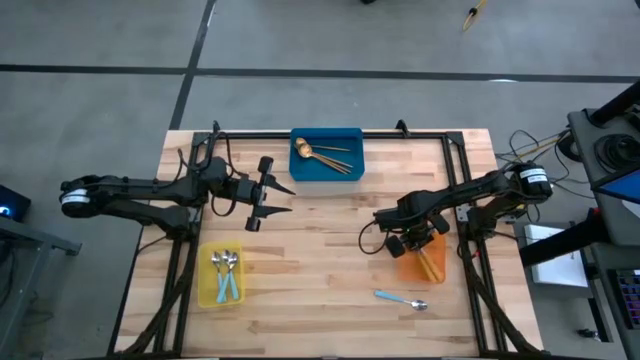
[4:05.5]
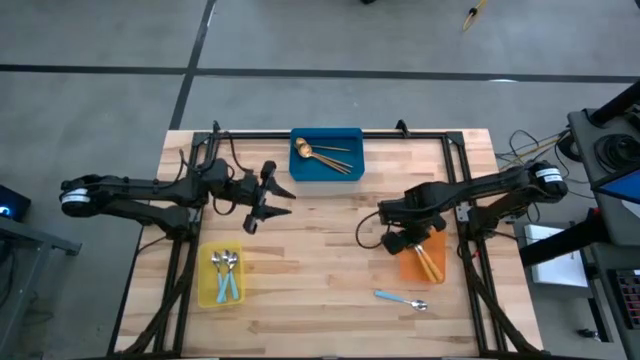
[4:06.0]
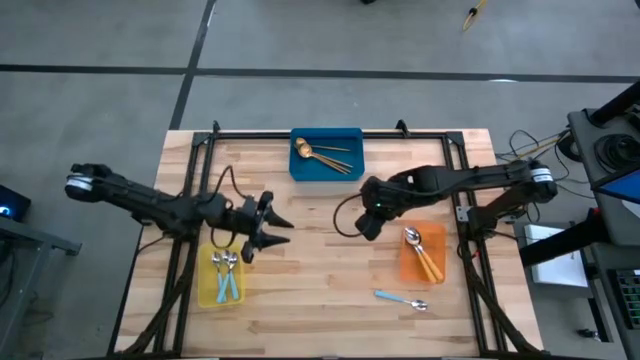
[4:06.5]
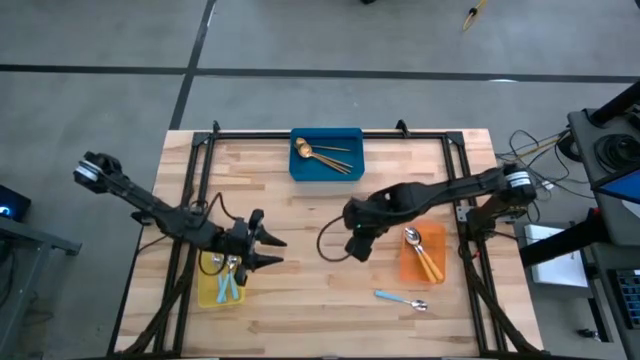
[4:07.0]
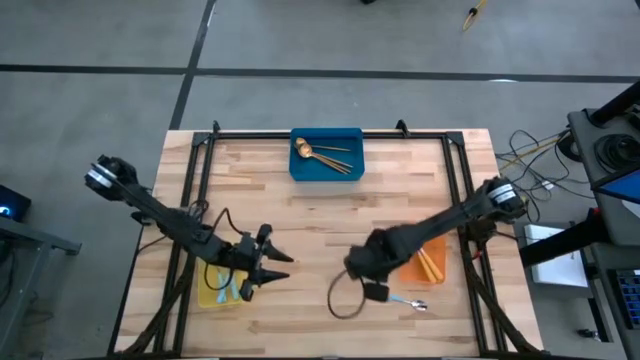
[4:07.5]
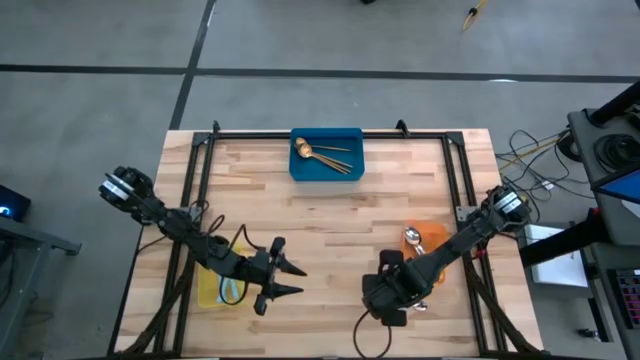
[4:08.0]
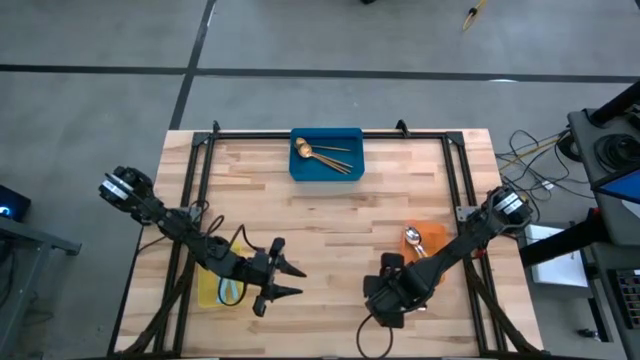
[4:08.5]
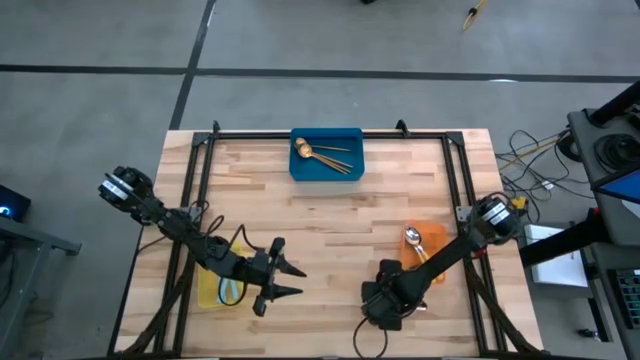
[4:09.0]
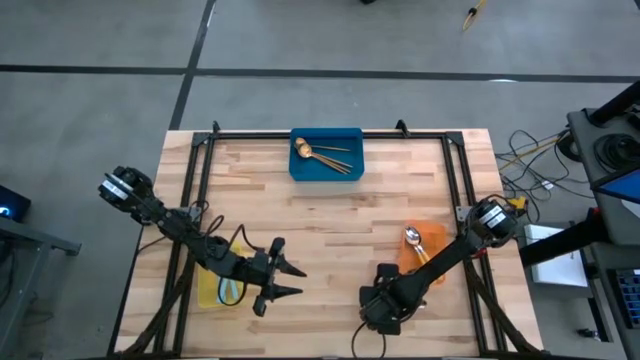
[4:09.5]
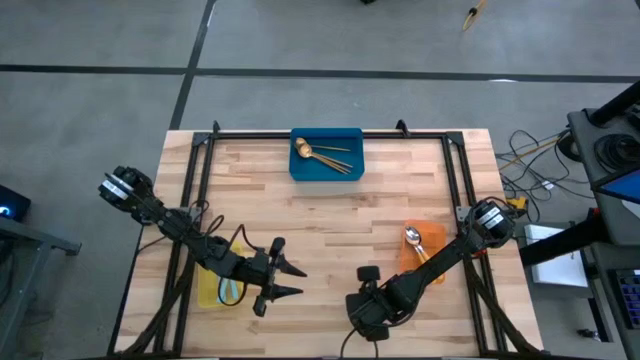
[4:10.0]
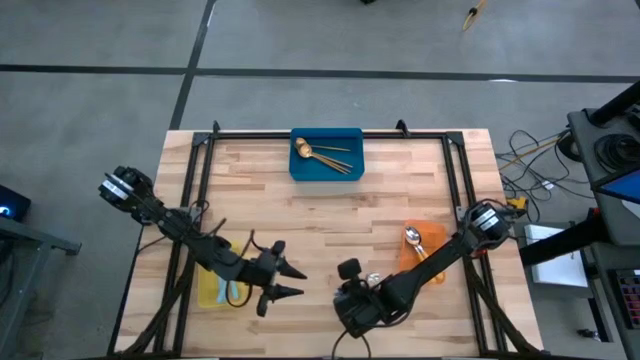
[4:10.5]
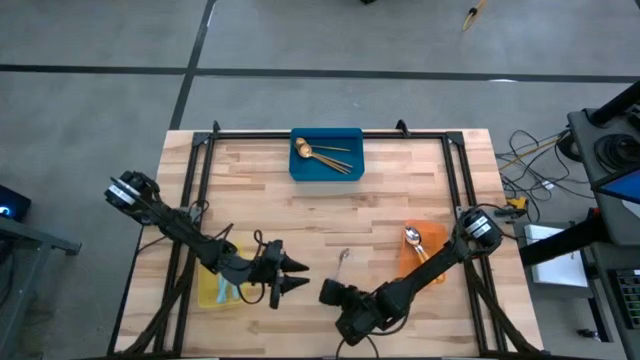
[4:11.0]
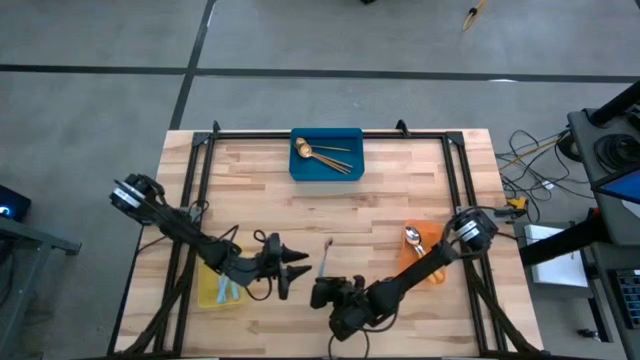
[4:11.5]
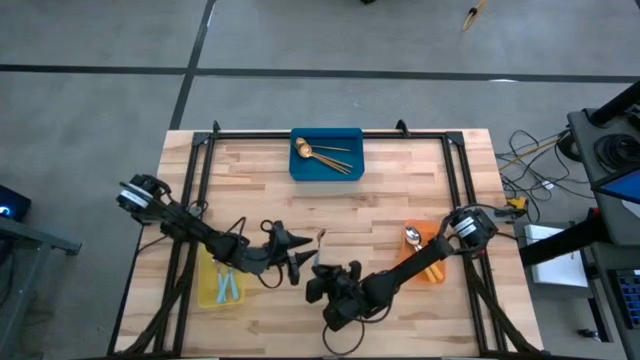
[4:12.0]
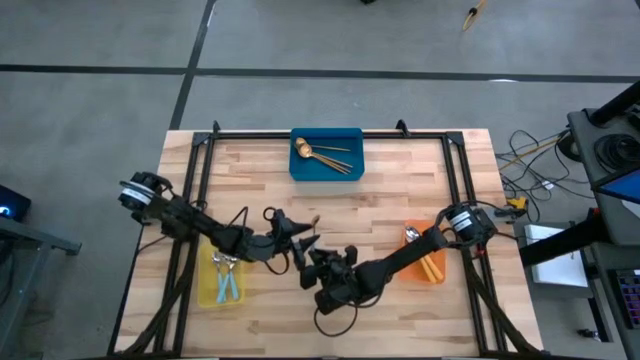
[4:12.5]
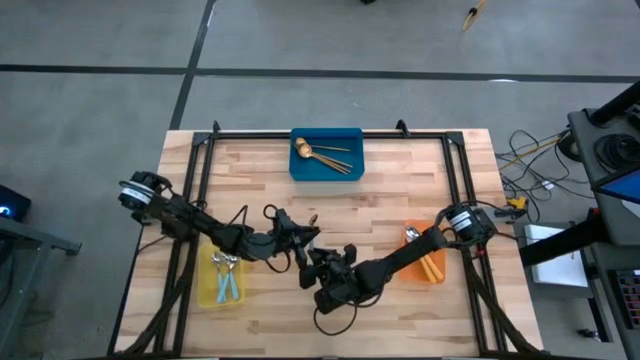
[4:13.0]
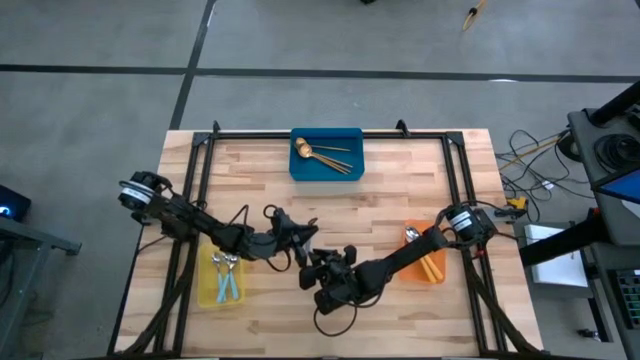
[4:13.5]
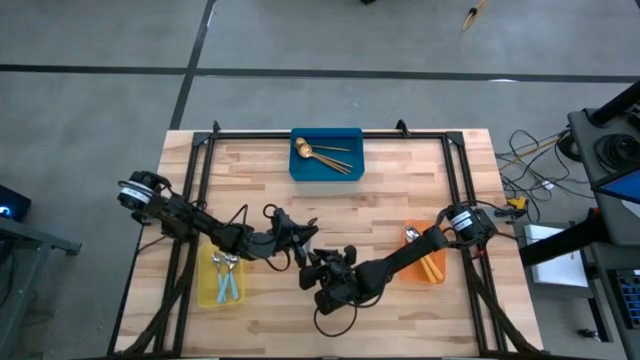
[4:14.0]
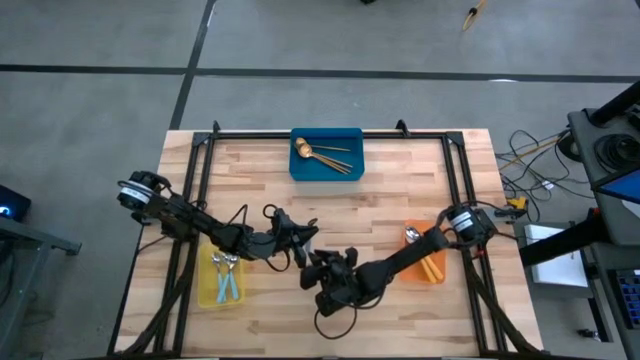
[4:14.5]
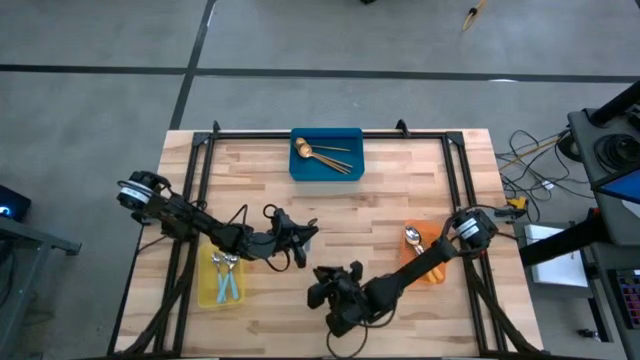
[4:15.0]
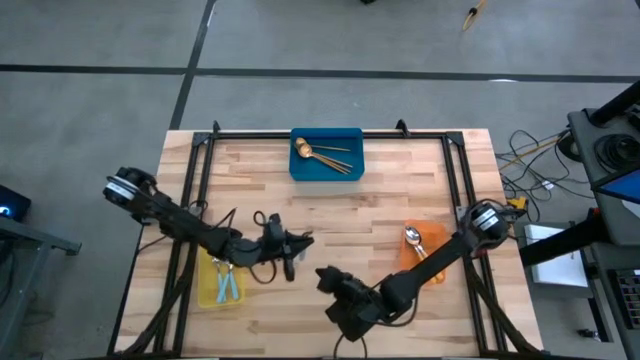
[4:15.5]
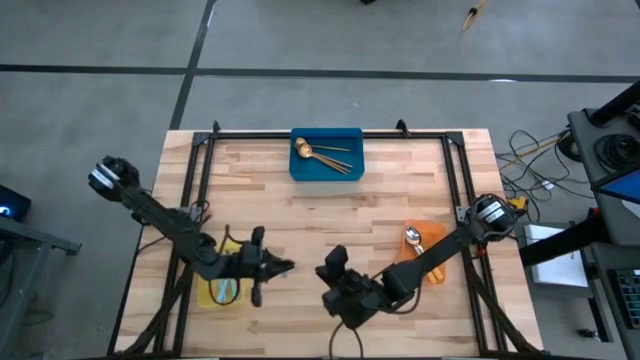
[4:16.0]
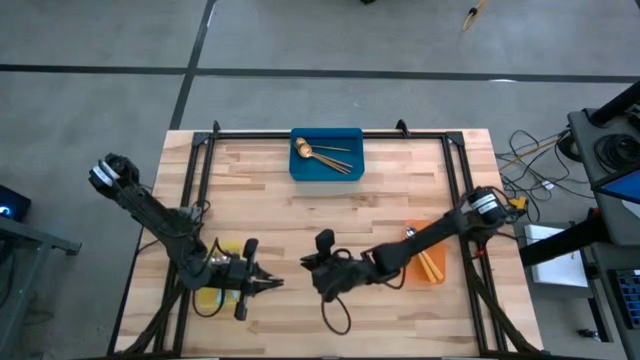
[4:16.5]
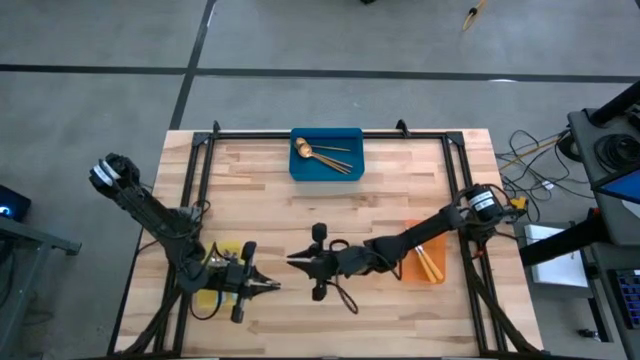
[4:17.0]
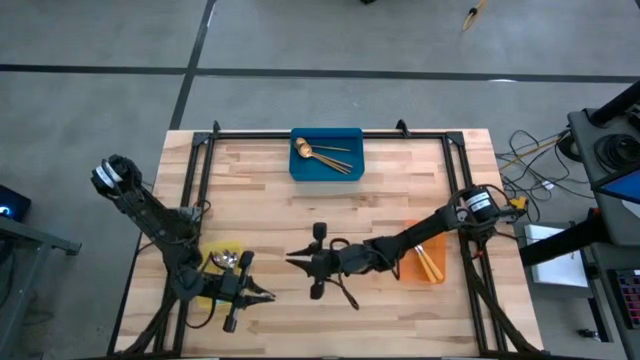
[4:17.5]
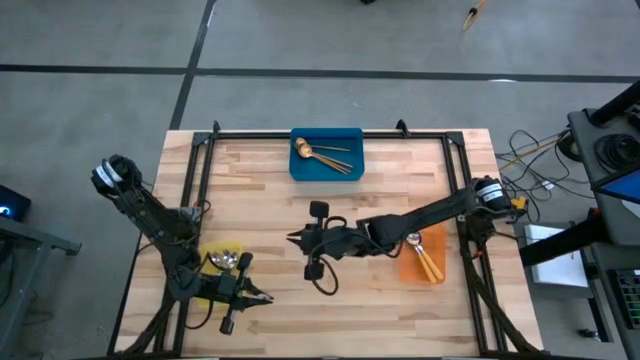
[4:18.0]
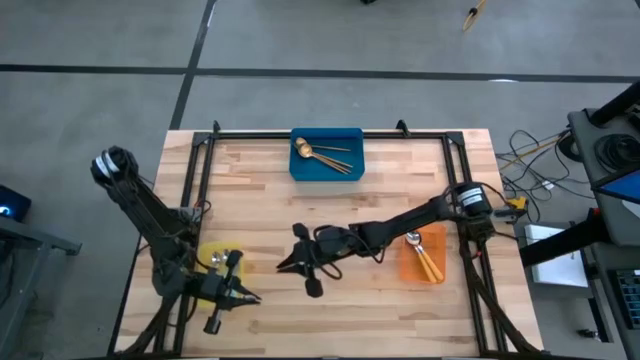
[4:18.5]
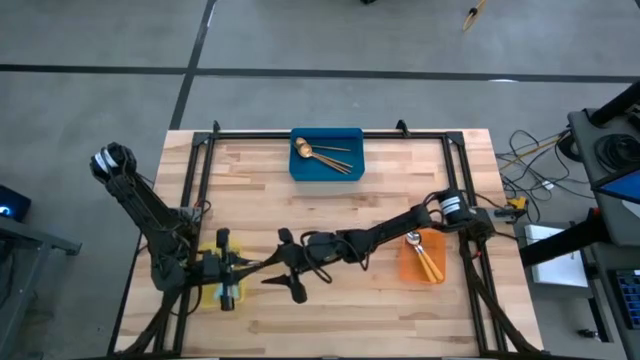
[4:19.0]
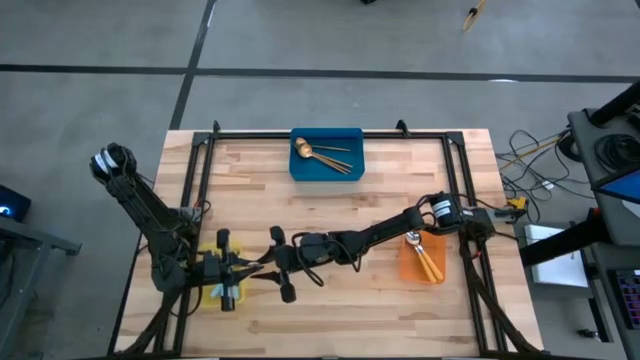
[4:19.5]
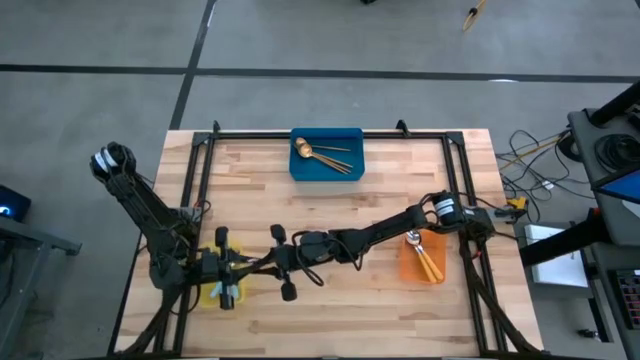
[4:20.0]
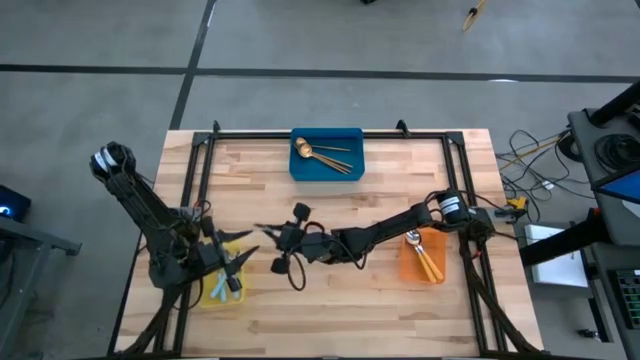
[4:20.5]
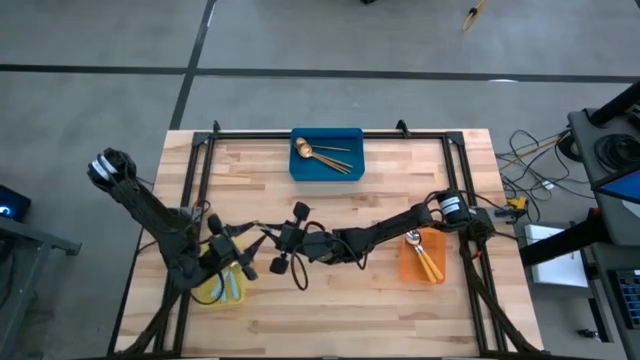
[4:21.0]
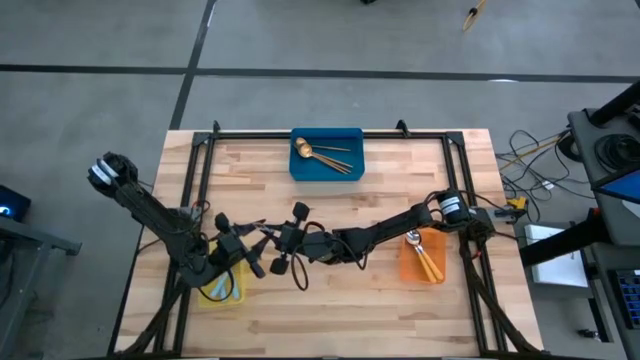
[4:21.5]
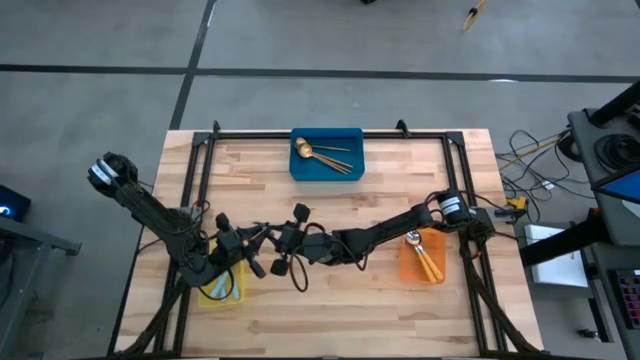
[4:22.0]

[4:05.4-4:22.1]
Task: Sort silverware by color (type)
Put the blue spoon into the yellow bin

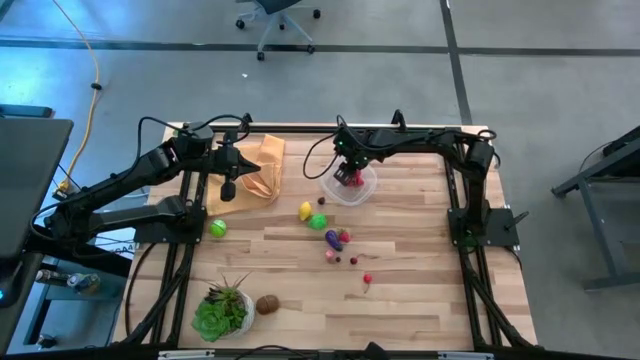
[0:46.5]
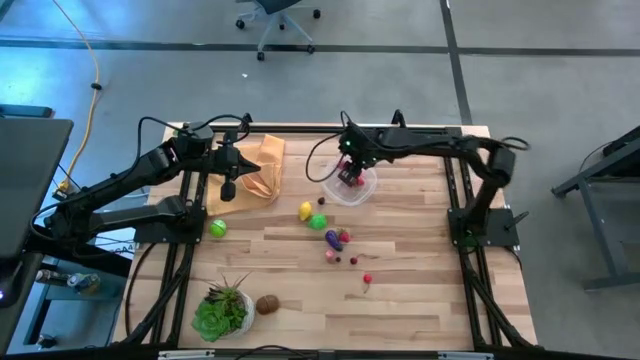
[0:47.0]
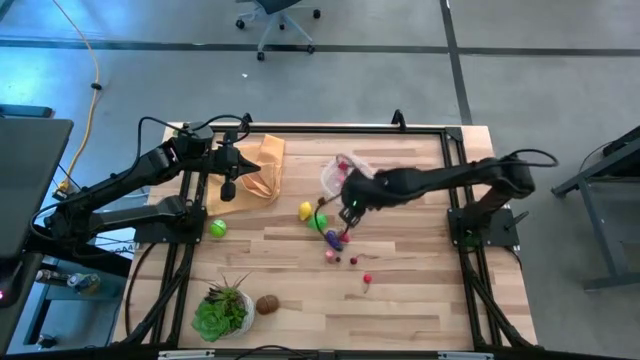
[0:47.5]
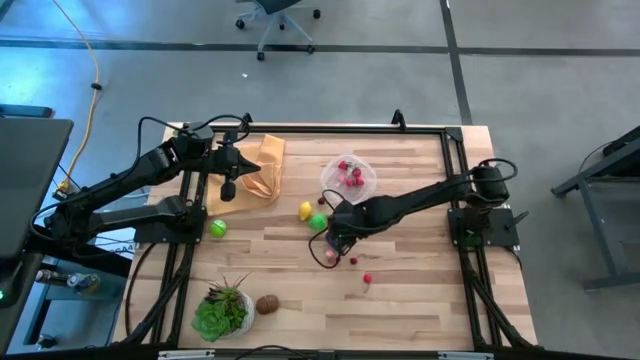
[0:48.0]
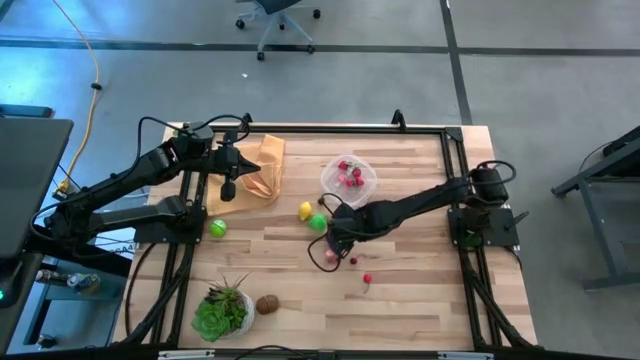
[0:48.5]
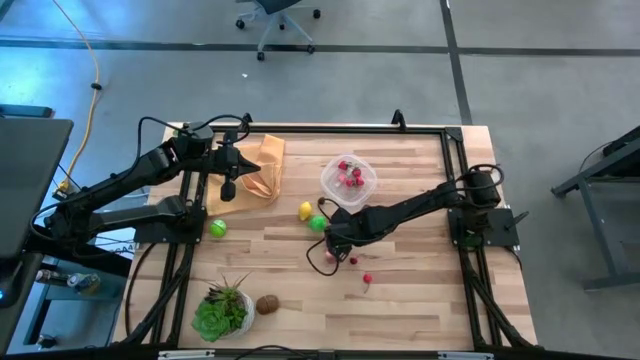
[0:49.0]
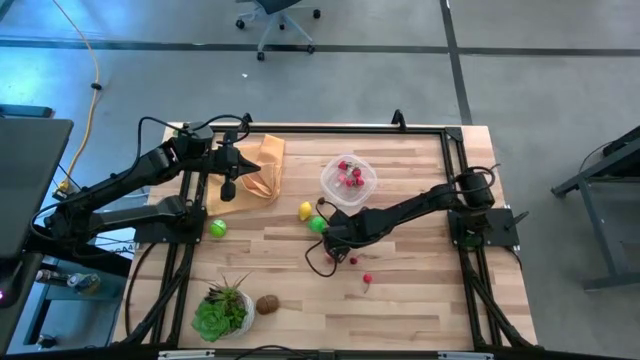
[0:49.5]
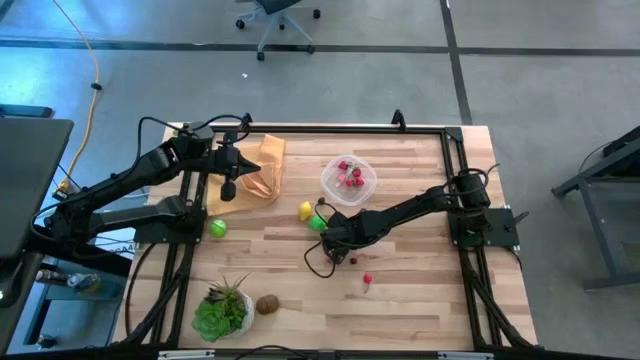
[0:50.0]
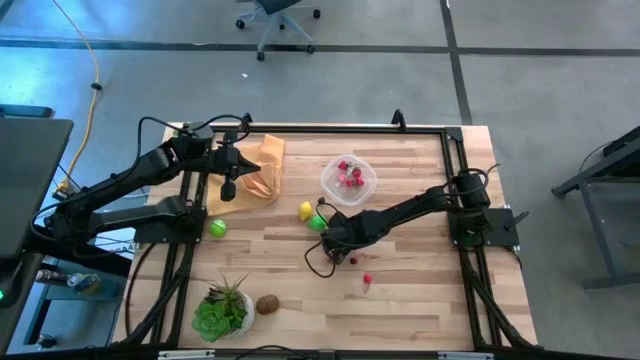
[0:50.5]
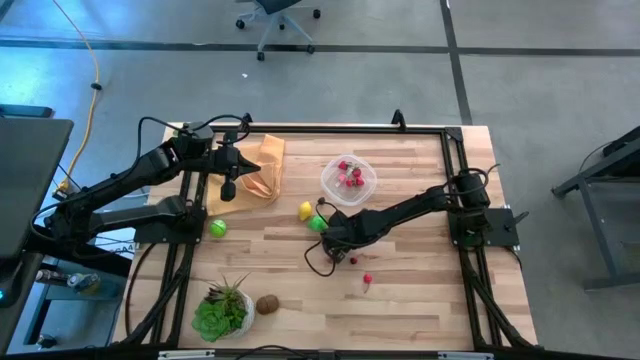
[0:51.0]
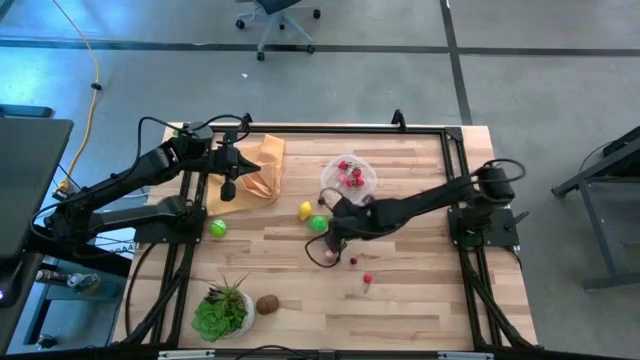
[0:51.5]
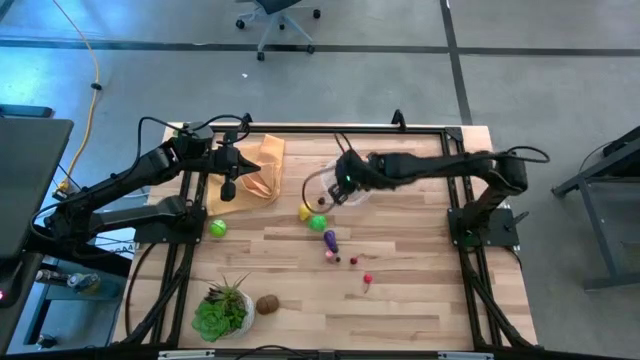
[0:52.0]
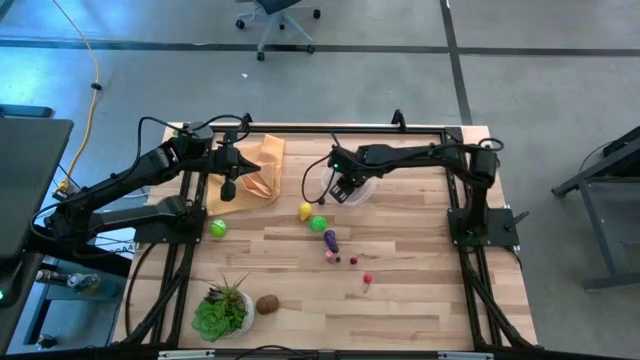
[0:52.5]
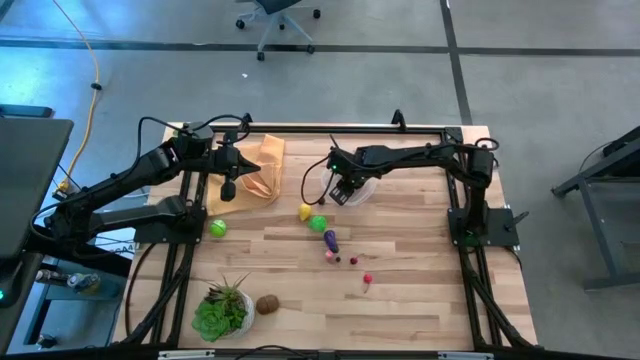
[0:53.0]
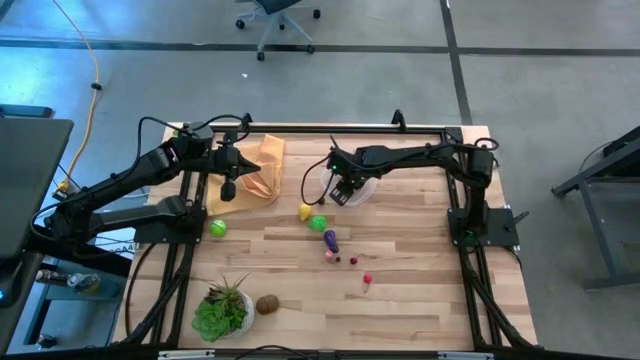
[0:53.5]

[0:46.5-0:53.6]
Task: Pick and placing Produce into tupperware
Put the red strawberry into the transparent container
